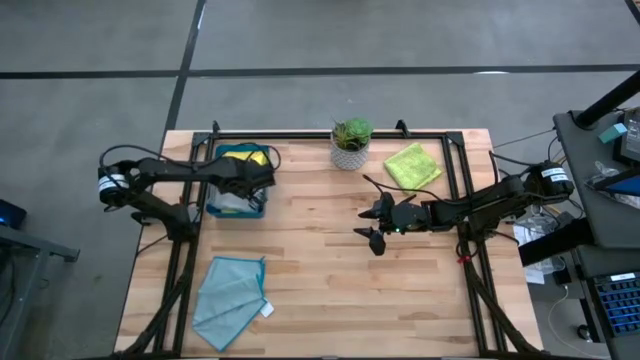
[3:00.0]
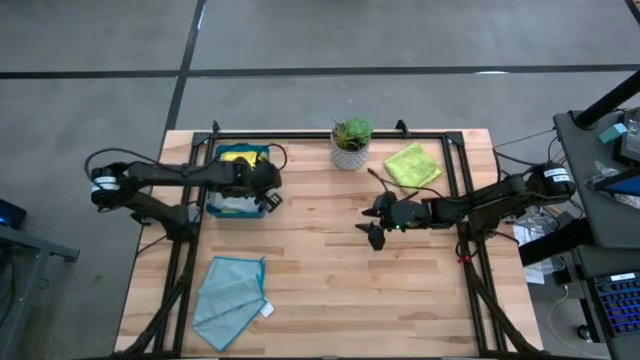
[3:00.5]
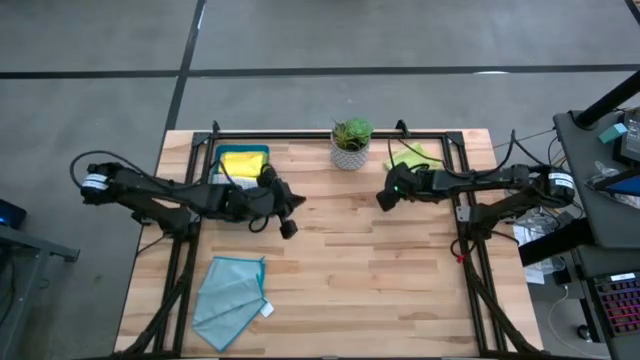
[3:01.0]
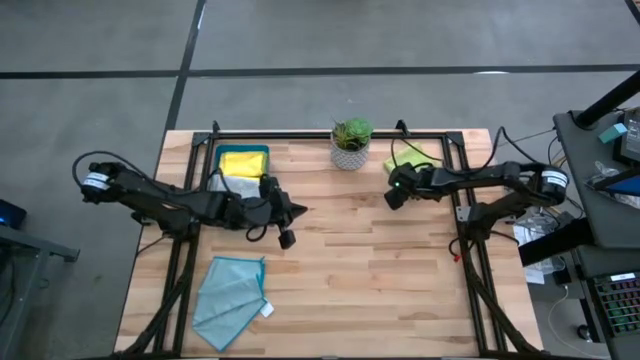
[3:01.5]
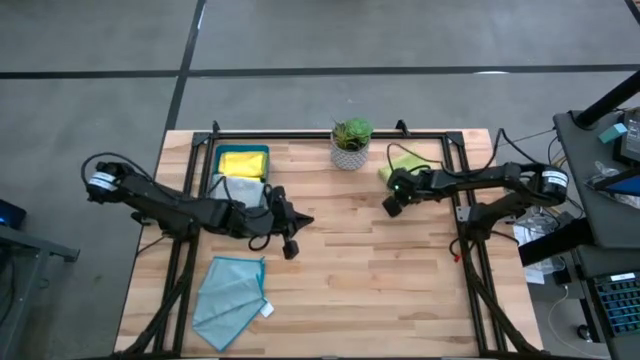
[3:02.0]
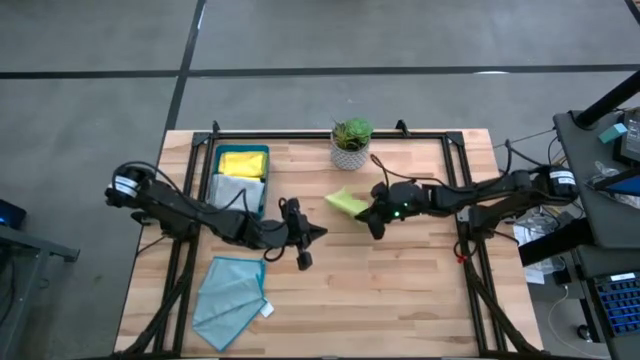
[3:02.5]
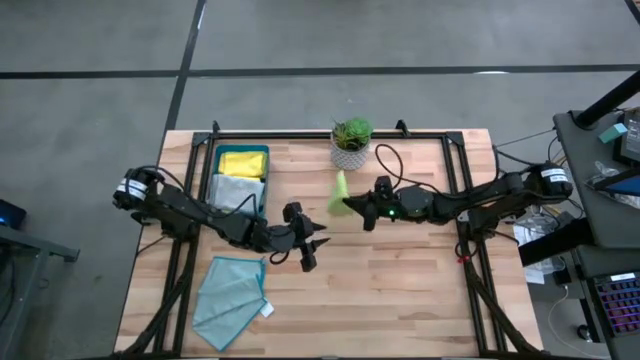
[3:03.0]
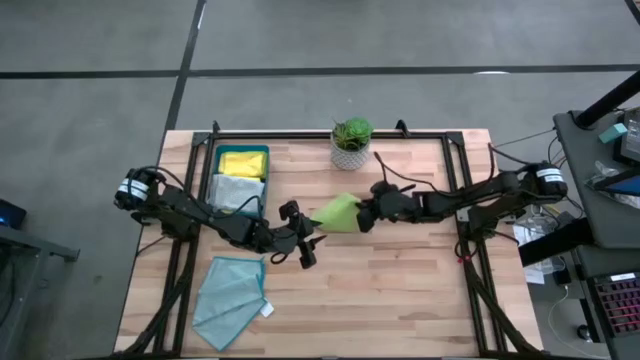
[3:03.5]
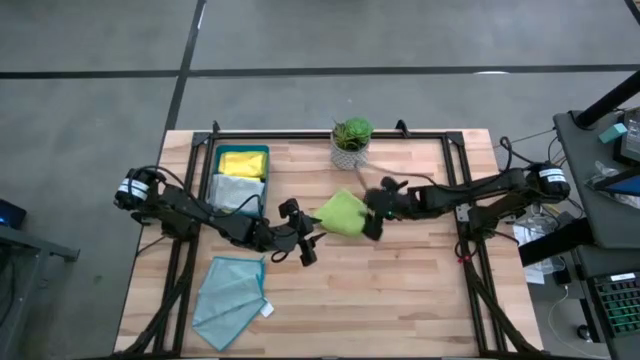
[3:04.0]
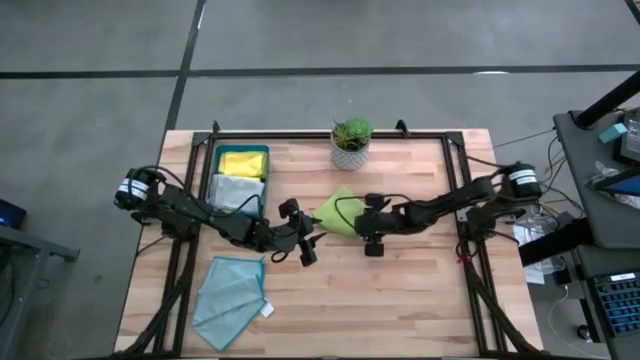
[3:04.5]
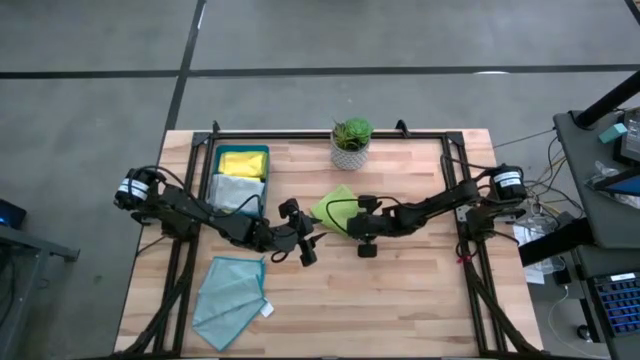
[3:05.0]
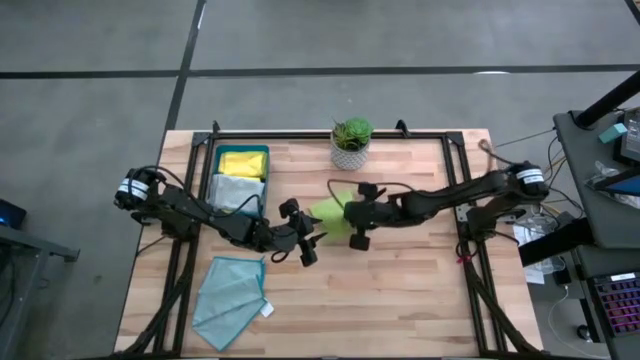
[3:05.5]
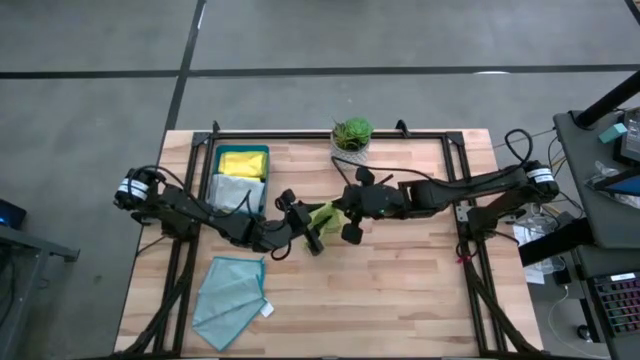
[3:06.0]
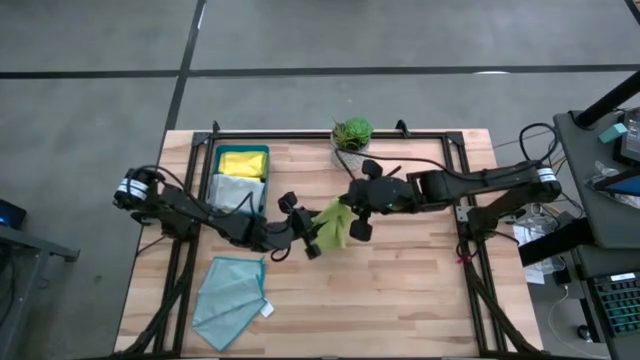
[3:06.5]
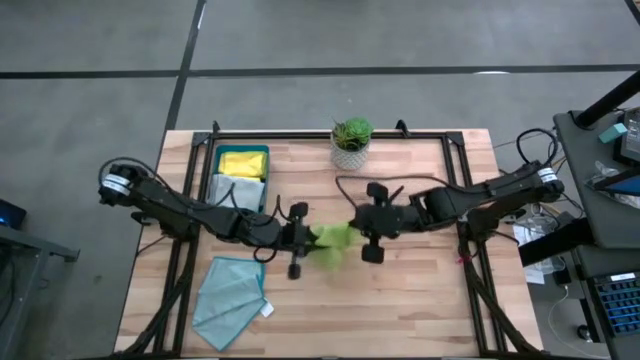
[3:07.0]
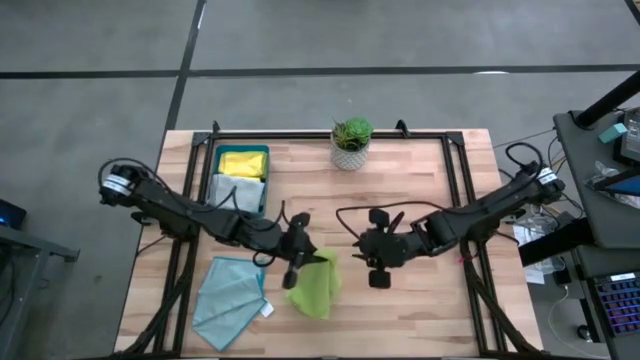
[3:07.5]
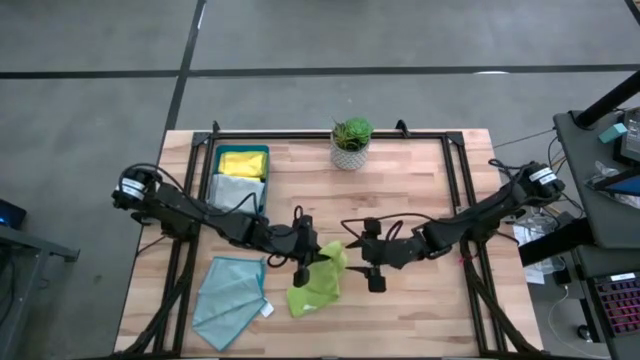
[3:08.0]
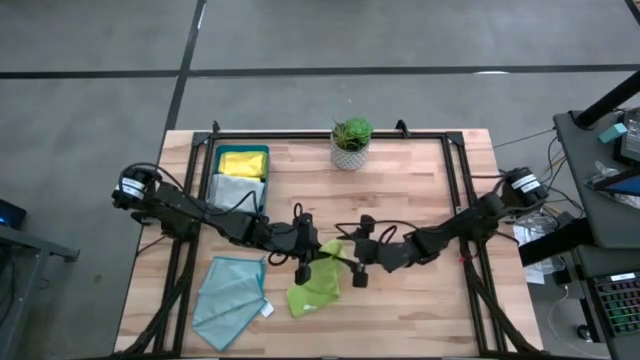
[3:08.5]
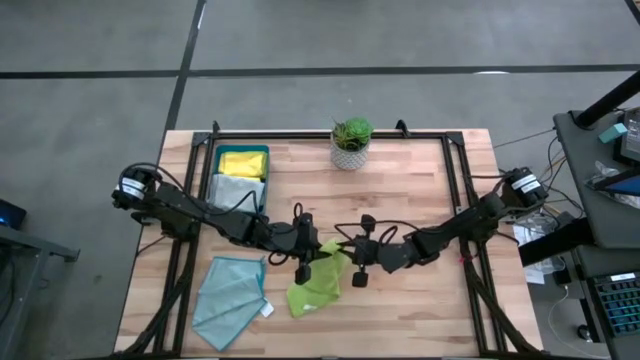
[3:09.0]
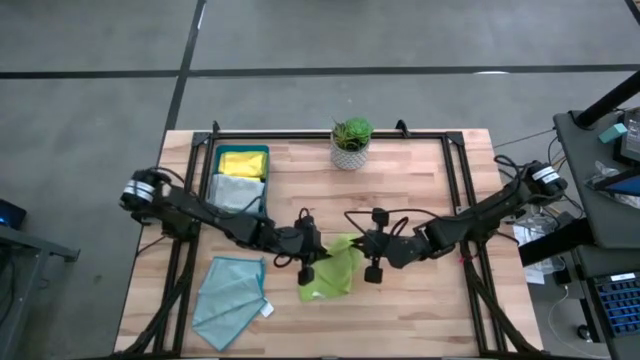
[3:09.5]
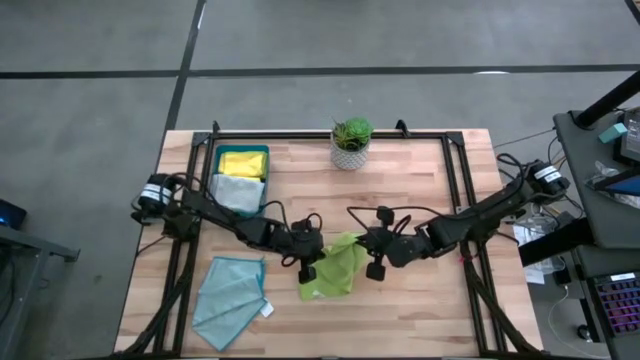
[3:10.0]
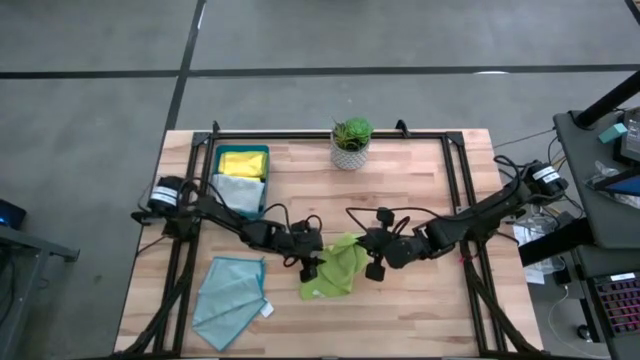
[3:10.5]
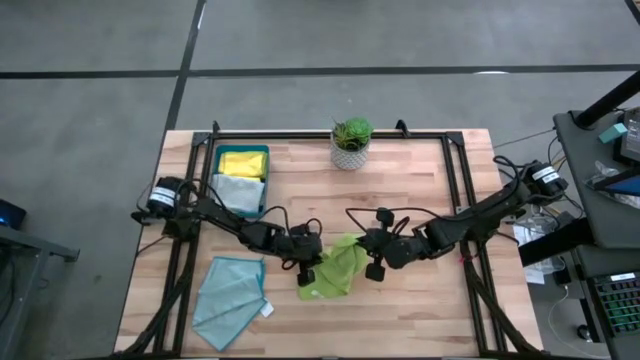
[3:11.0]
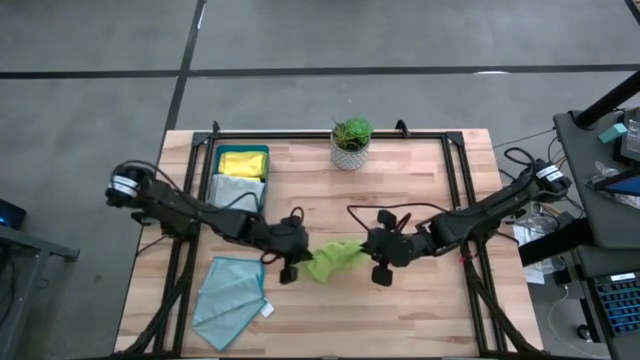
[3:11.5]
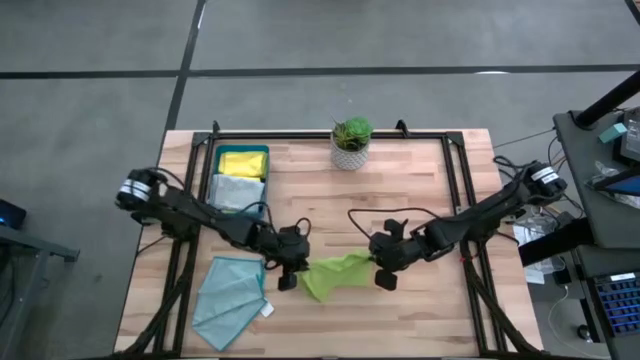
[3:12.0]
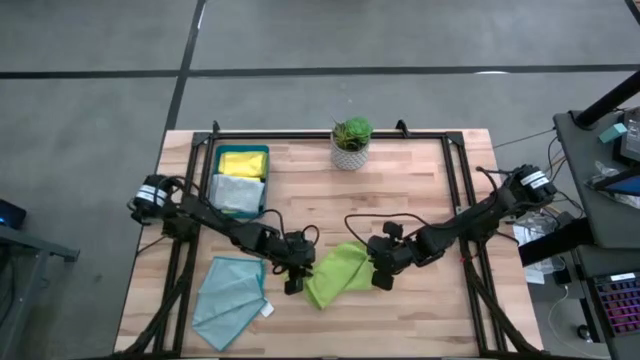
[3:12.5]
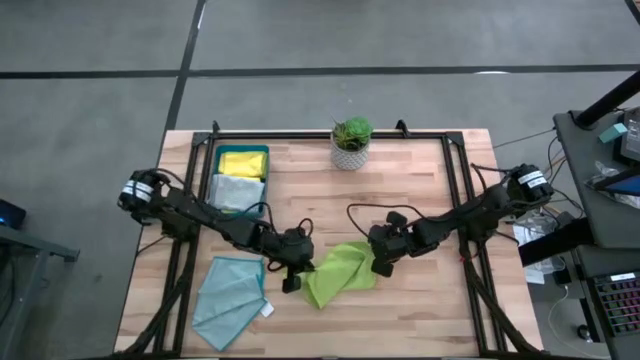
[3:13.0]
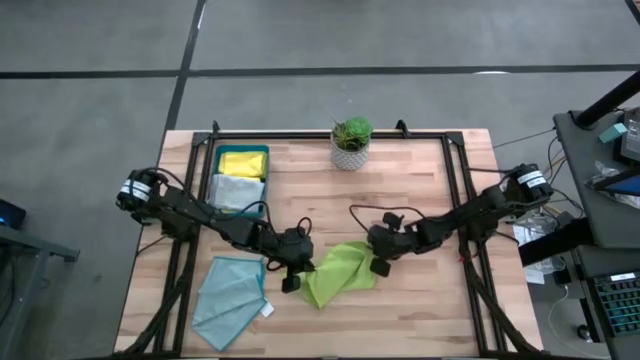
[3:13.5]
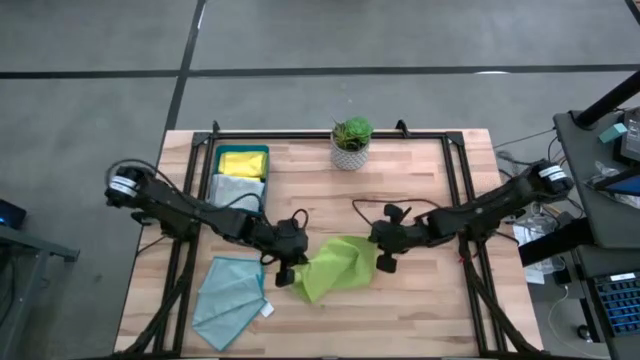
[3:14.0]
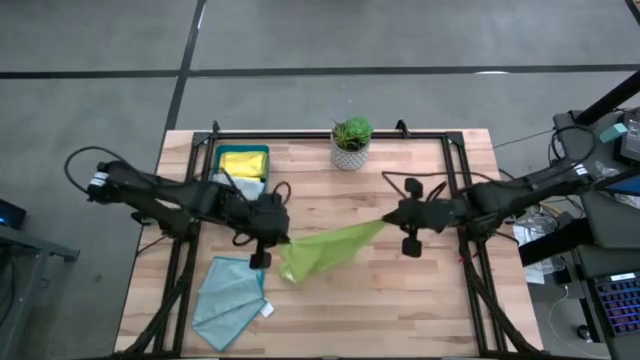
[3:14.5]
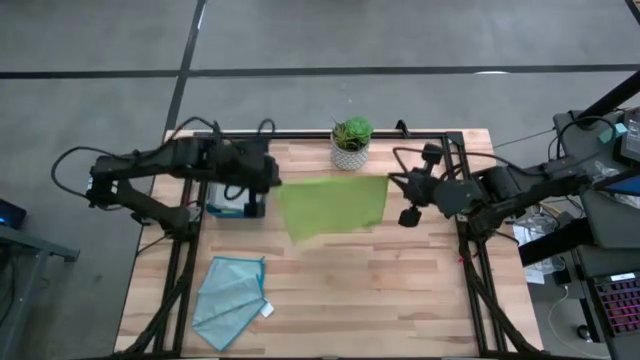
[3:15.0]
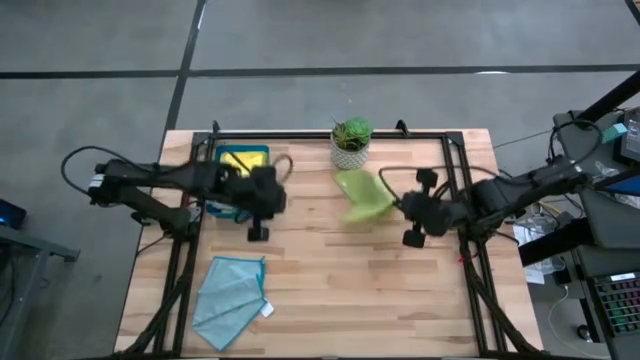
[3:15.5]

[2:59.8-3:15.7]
Task: Fold microfiber towels
Fold the green towel

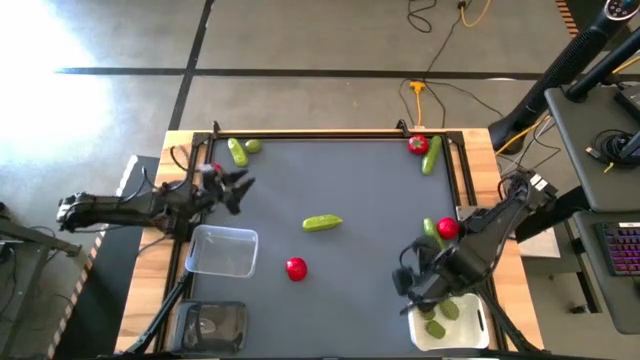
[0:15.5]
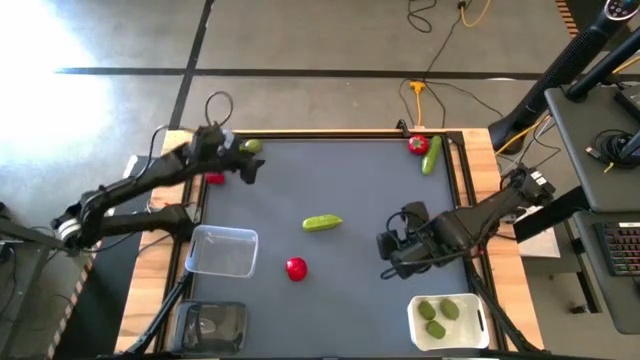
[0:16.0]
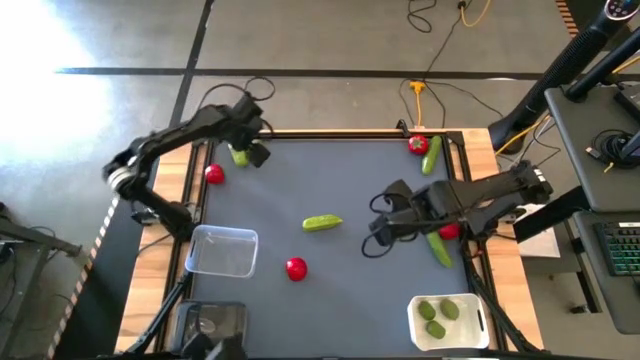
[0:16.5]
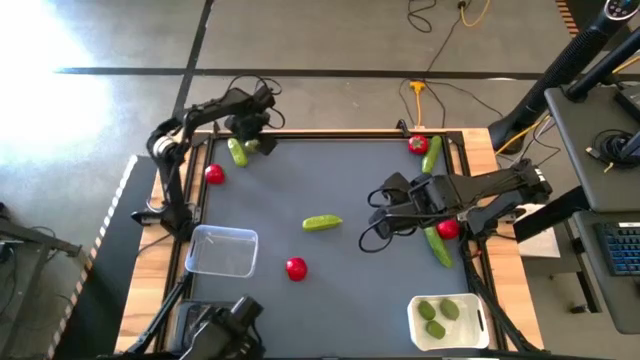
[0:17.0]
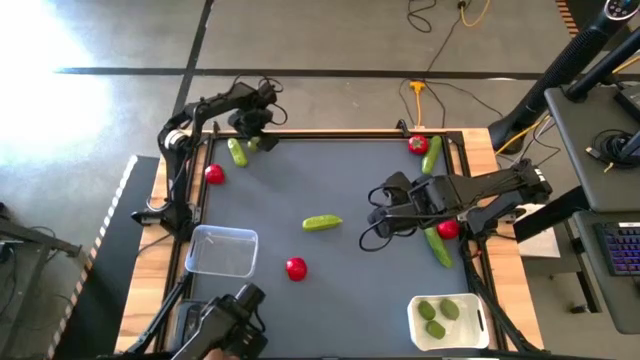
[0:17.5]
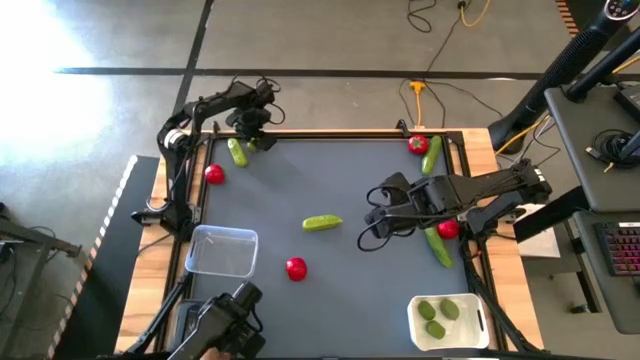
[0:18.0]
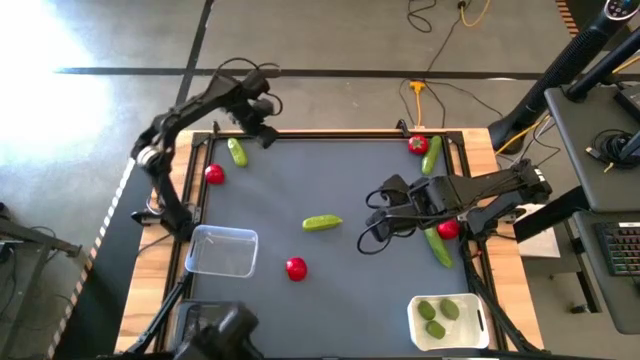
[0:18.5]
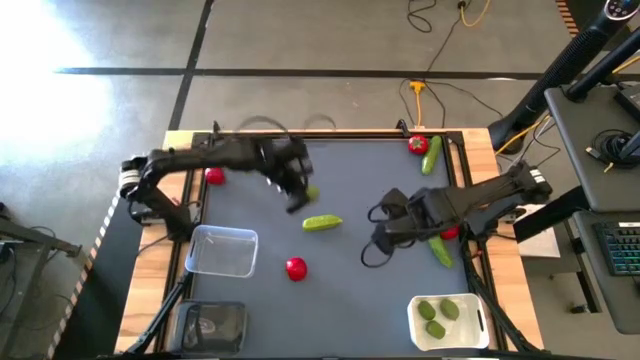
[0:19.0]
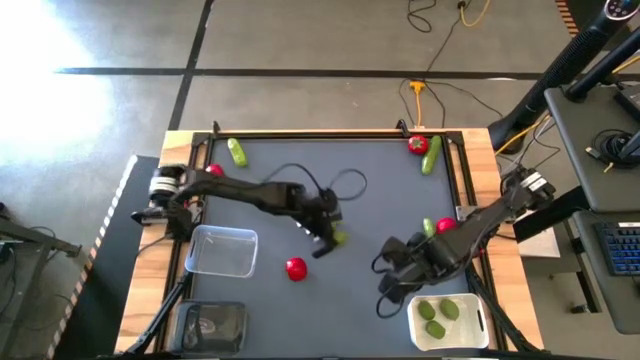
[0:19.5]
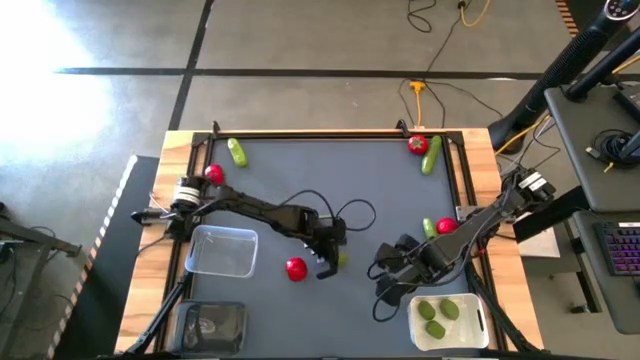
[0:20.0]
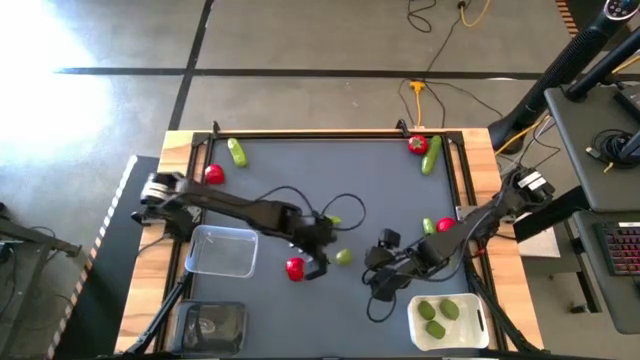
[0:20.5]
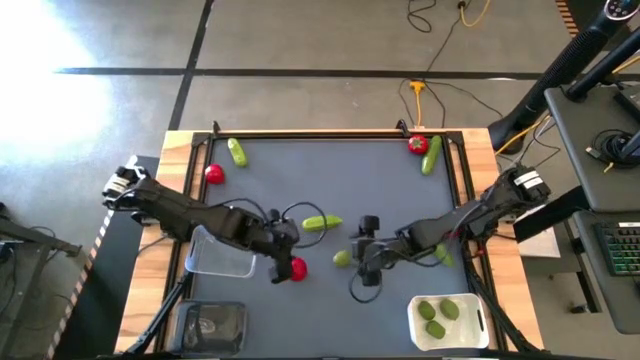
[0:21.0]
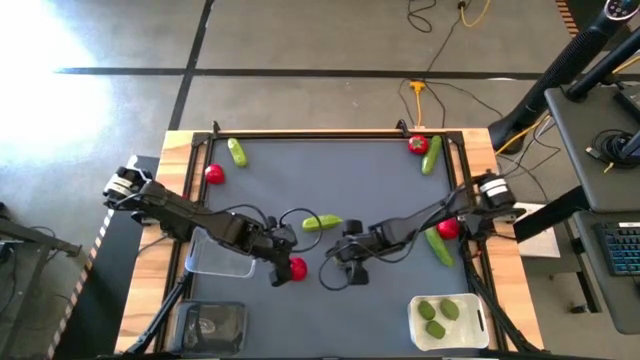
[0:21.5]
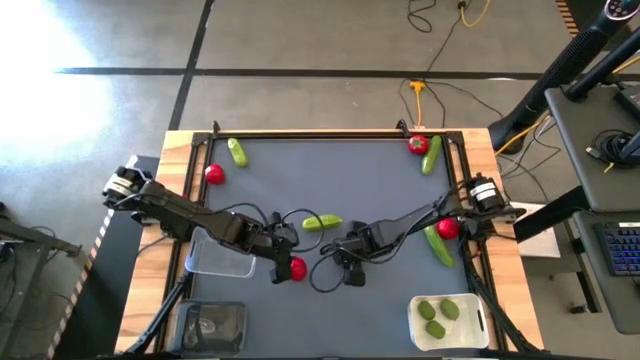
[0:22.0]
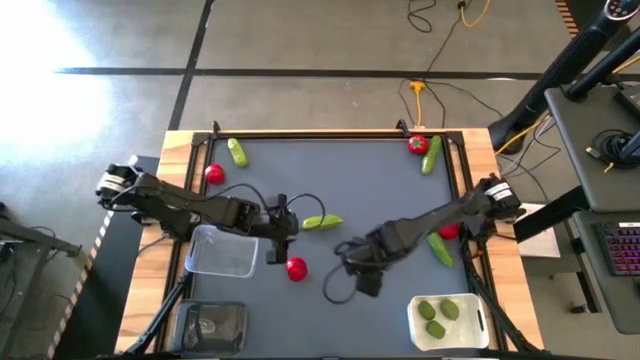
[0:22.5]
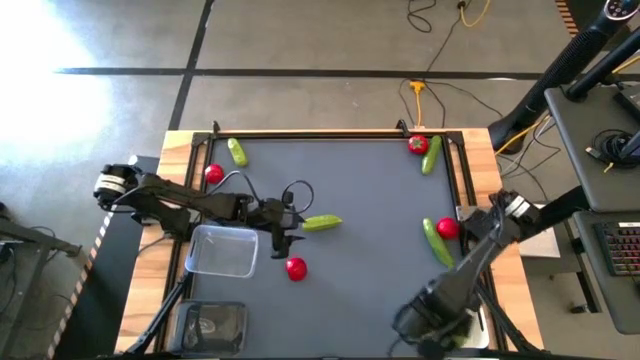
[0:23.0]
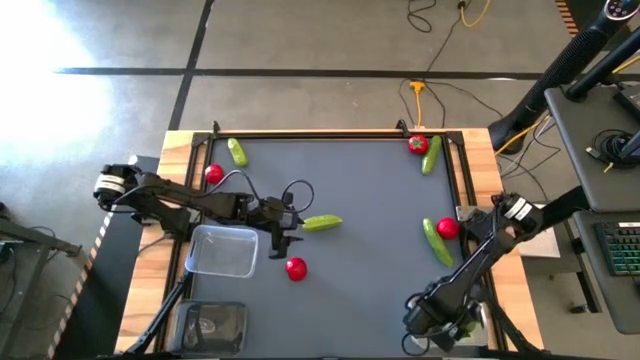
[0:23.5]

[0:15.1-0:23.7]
Task: Sort produce into baskets
Put the lime into the white bin
